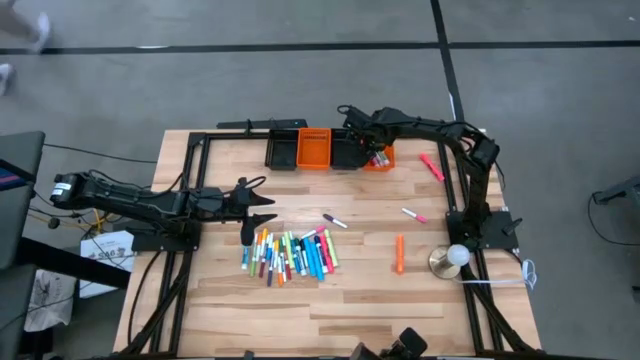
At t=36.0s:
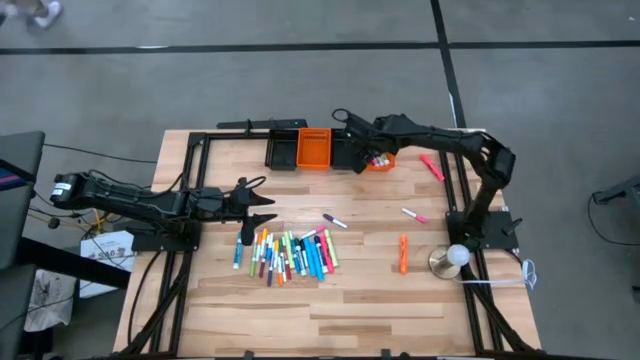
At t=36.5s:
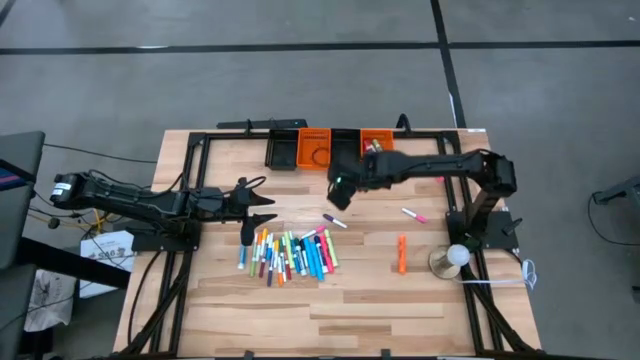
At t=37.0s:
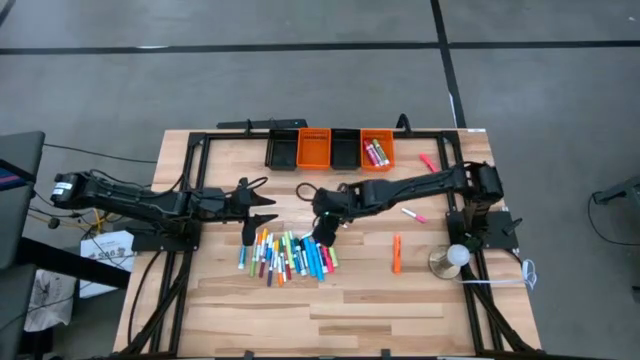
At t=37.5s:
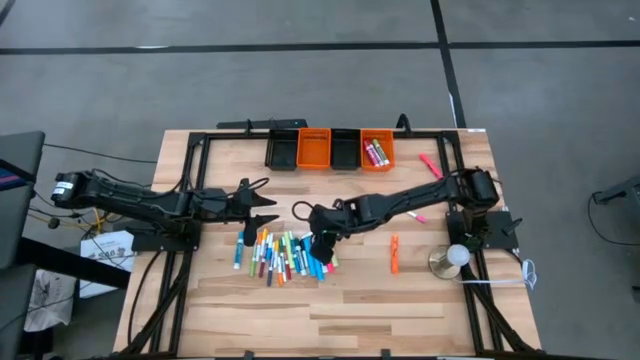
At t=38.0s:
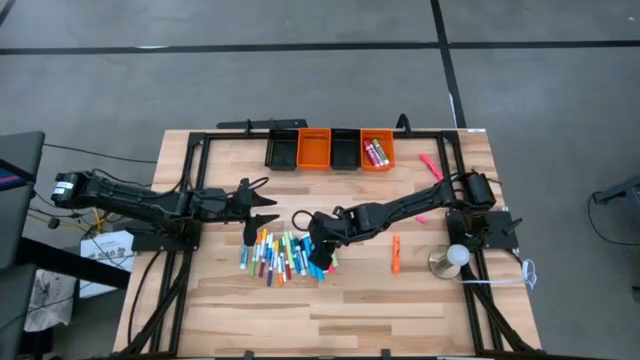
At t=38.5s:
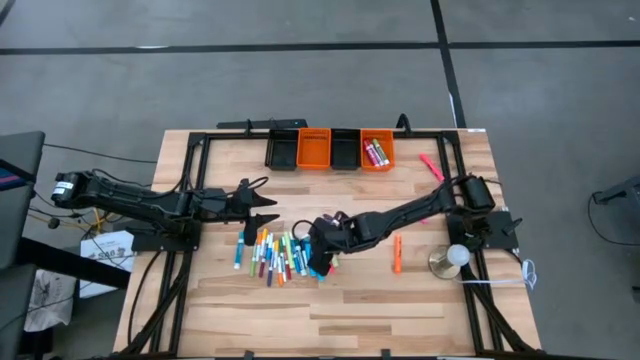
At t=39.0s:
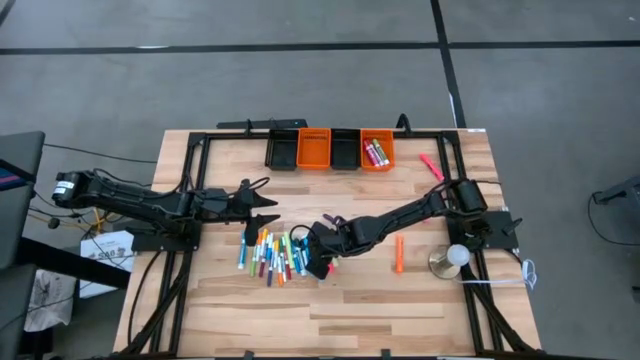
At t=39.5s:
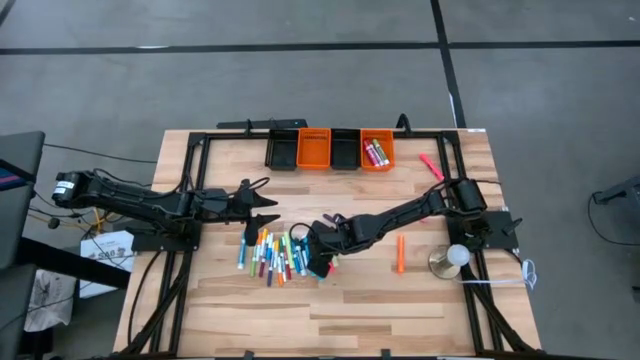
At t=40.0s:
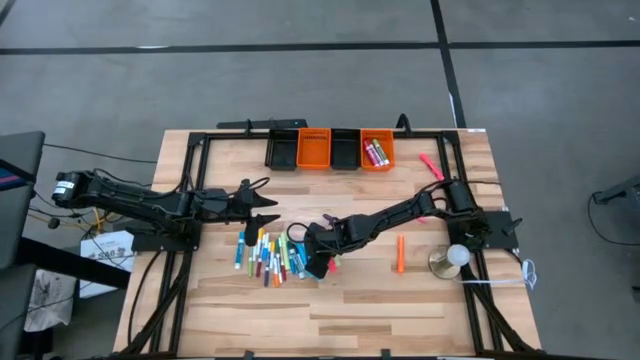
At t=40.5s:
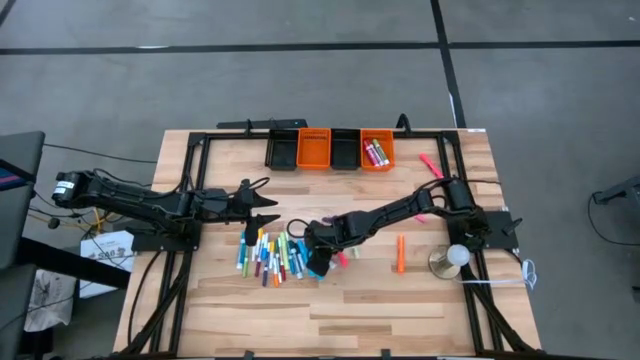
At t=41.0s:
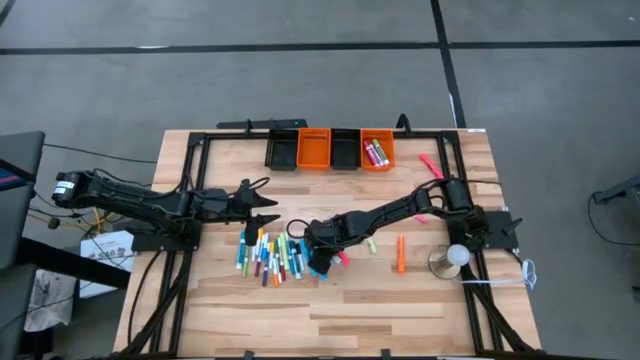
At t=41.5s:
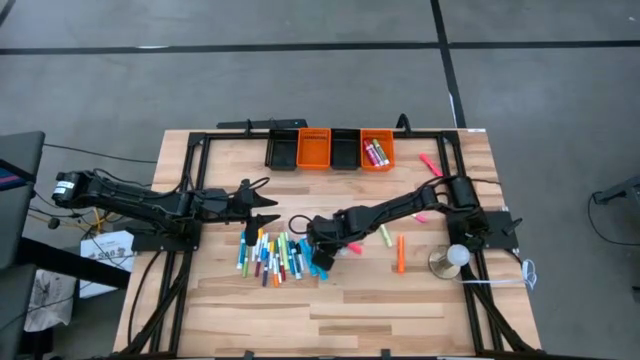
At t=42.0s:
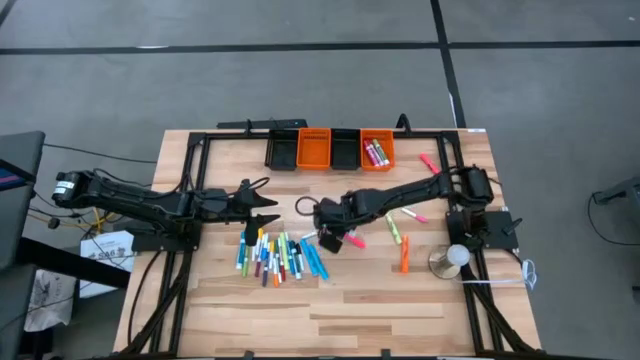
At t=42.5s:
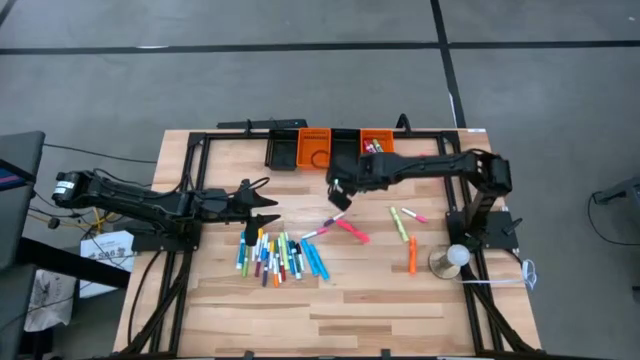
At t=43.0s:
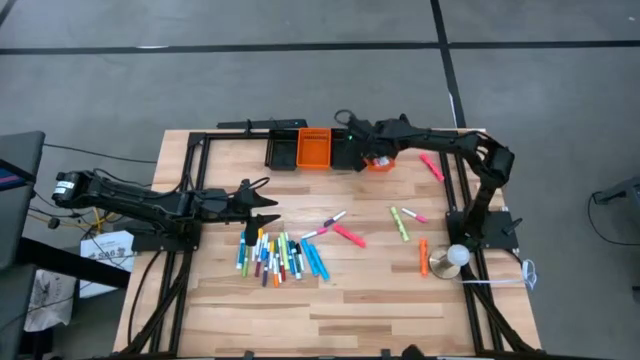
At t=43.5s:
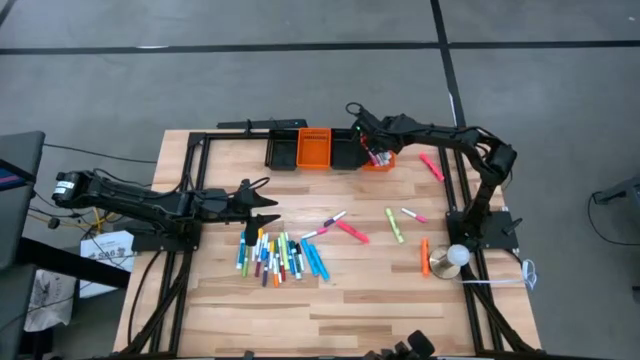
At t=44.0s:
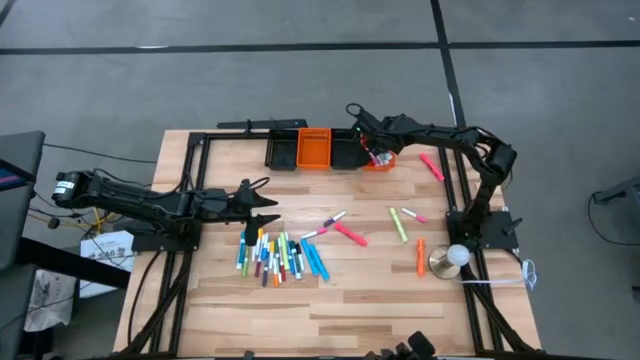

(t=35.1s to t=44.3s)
Task: Pick & Place Markers
Put the blue marker pen into the right orange bin

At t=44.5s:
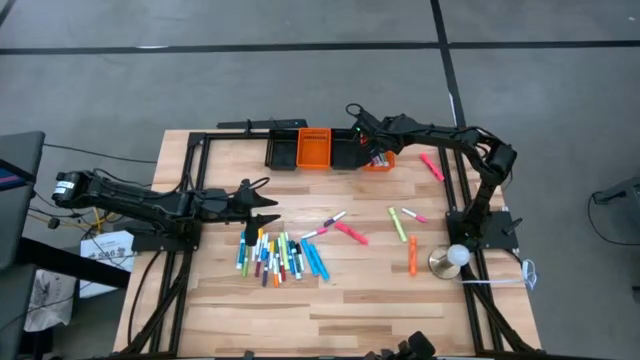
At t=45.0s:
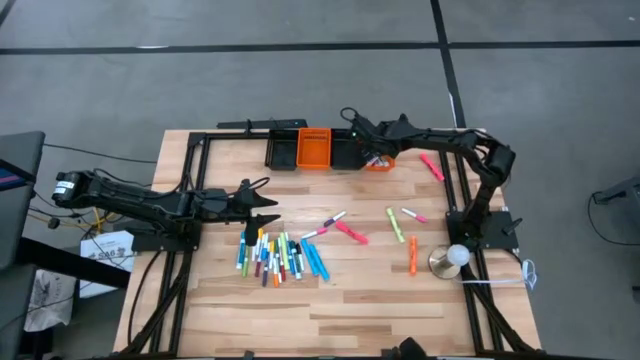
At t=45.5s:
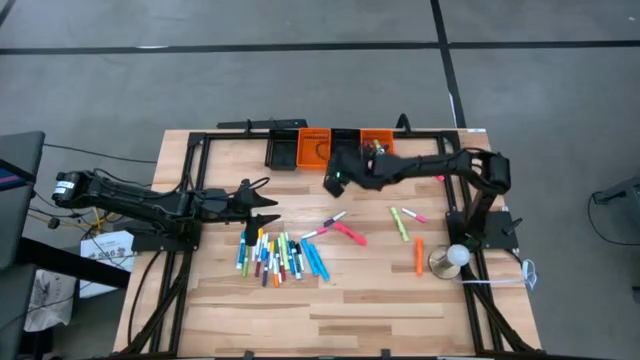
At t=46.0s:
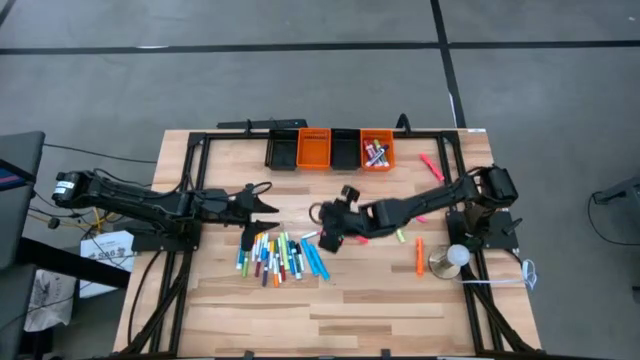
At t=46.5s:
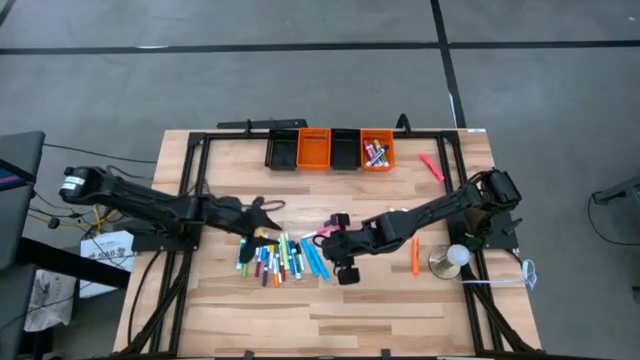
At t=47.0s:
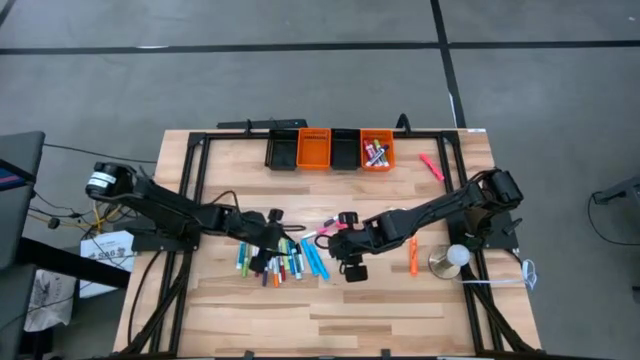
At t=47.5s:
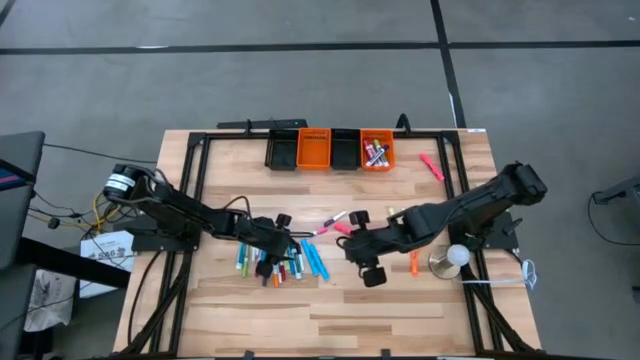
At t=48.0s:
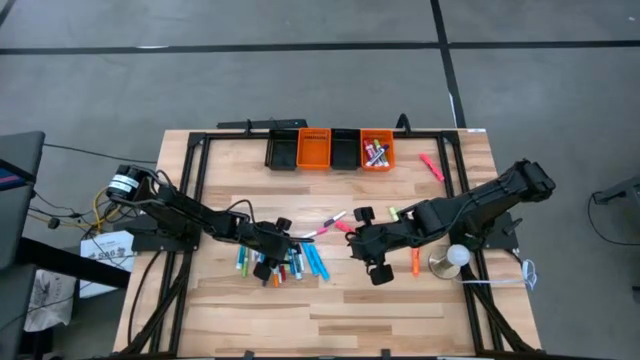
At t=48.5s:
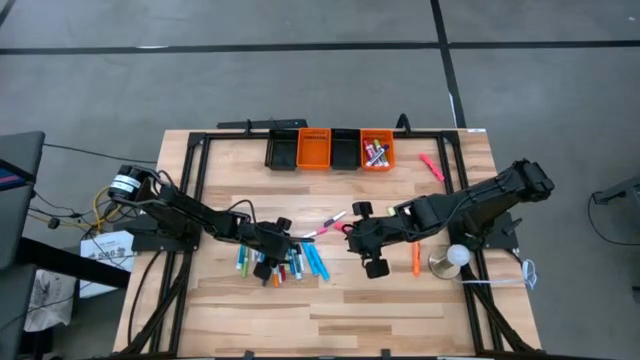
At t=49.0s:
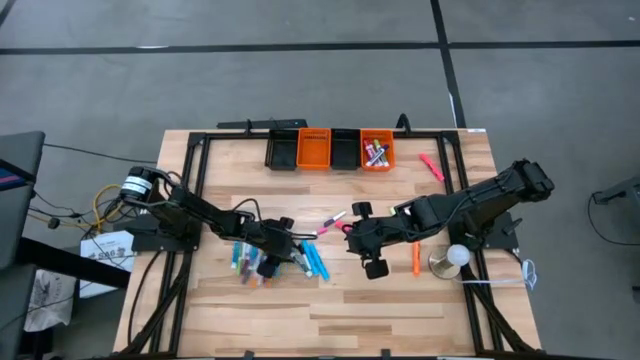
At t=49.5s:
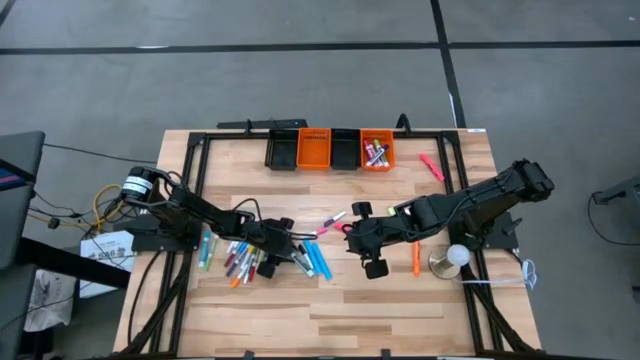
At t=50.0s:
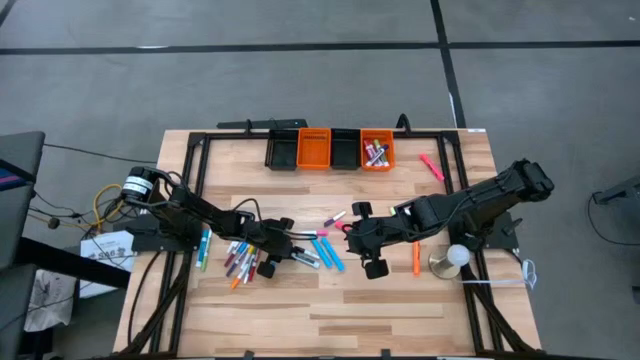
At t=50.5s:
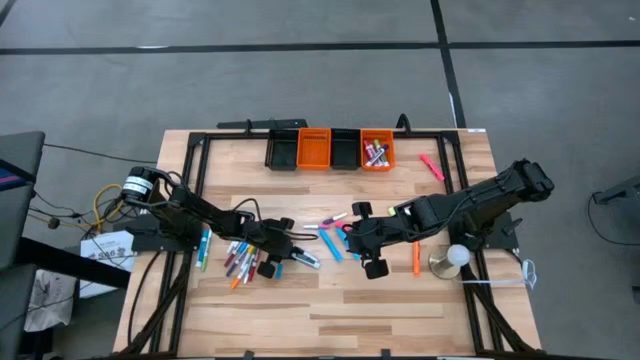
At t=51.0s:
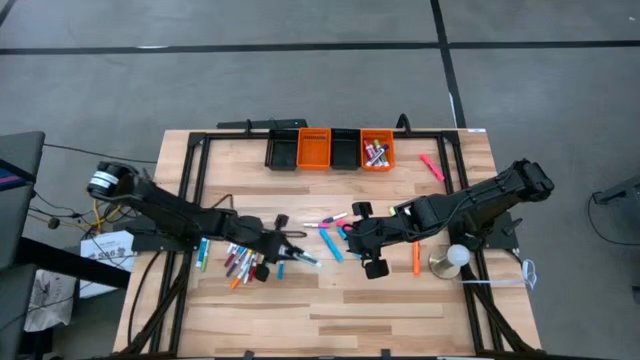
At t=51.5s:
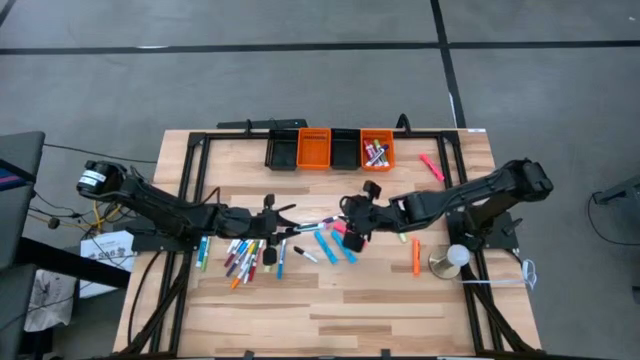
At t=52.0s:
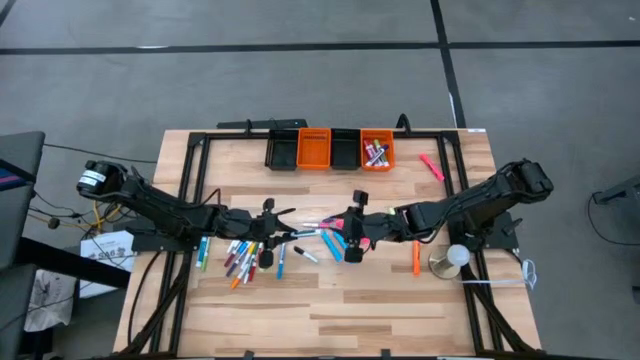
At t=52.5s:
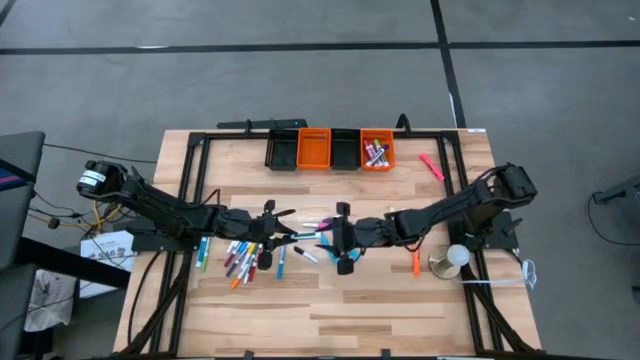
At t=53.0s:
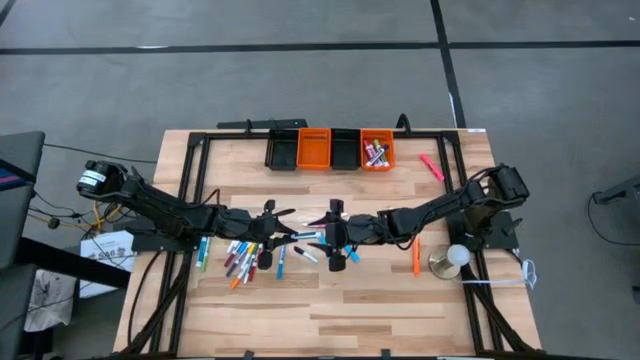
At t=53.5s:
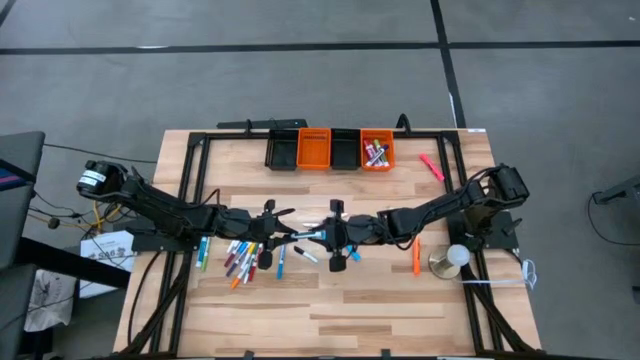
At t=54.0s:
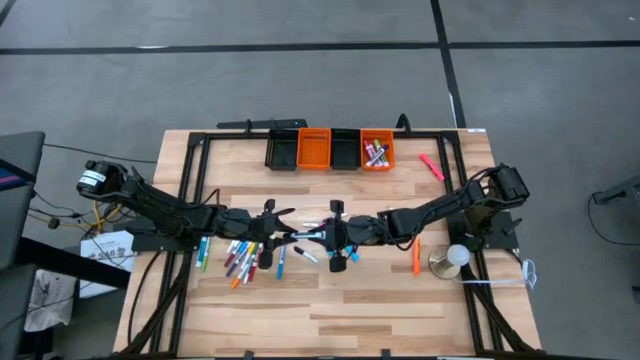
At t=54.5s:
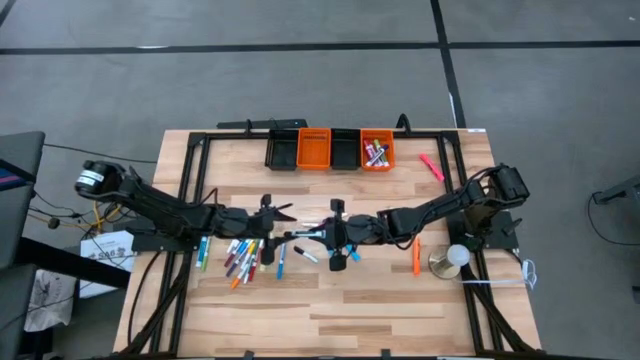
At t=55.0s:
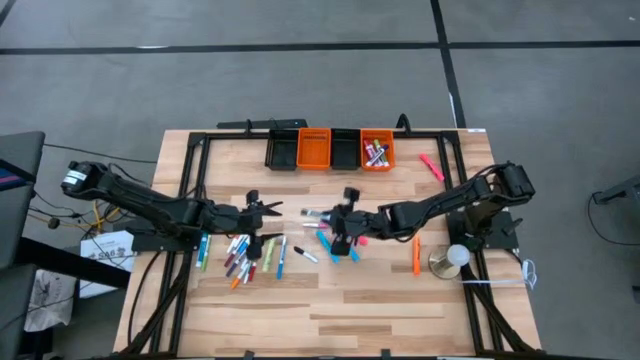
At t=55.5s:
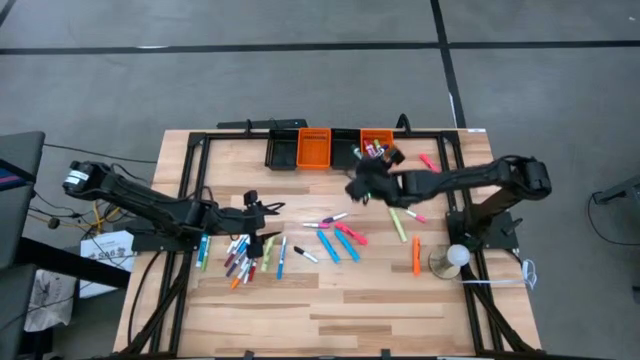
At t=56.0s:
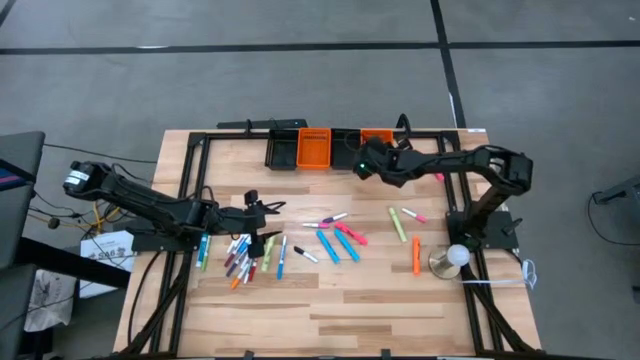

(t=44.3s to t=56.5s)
Put the gray marker pen into the right orange bin

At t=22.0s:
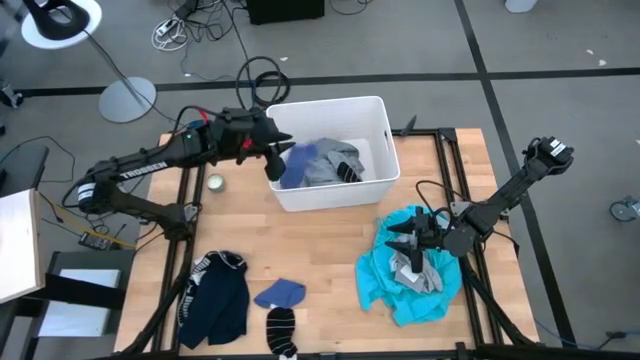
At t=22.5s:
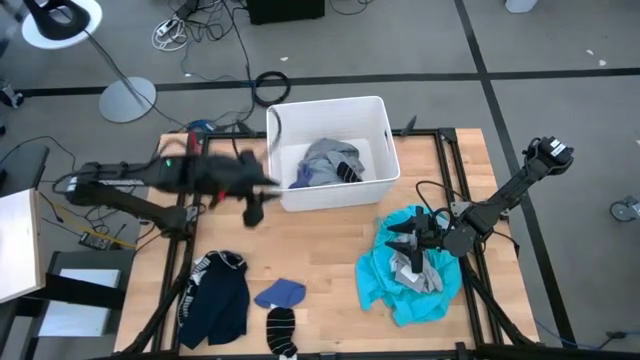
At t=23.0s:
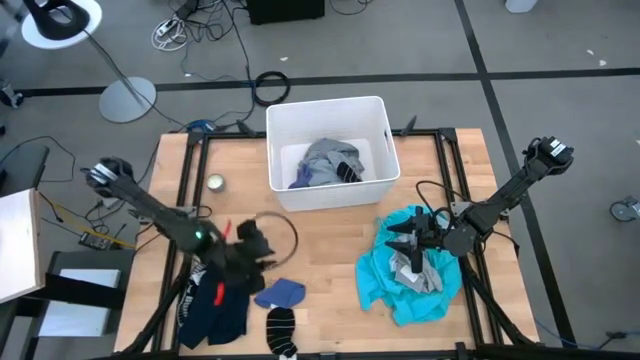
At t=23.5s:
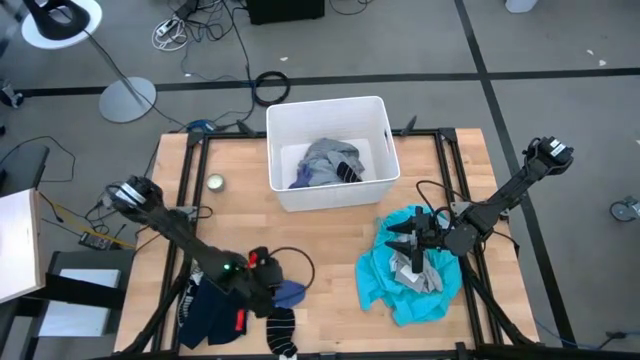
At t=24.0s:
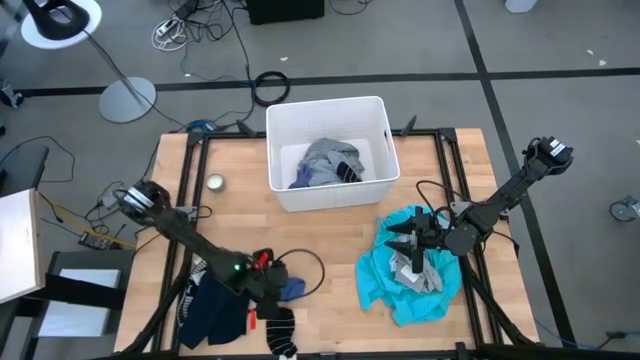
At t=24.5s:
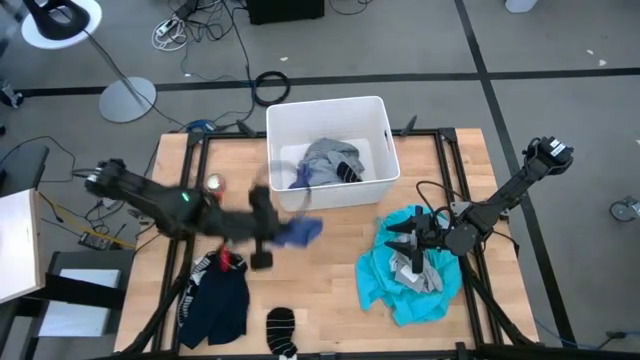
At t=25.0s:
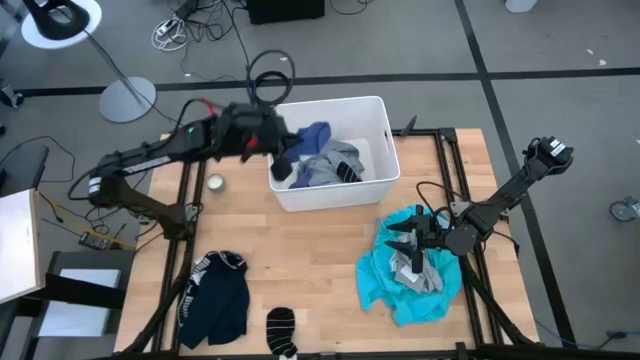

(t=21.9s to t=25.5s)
Task: Sort clothes
Put the blue sock into the white laundry organizer
